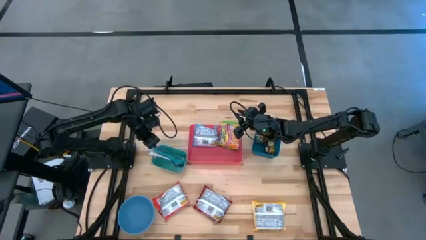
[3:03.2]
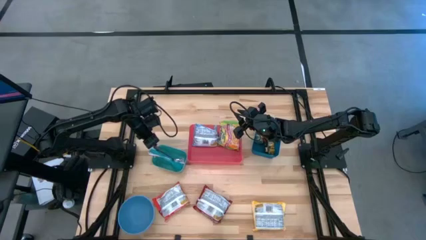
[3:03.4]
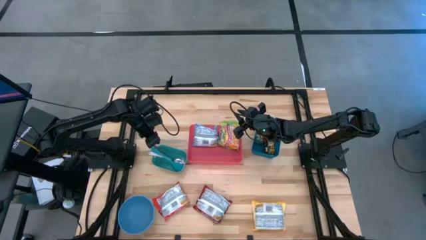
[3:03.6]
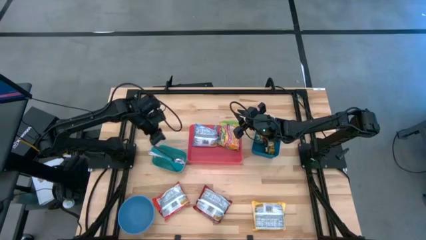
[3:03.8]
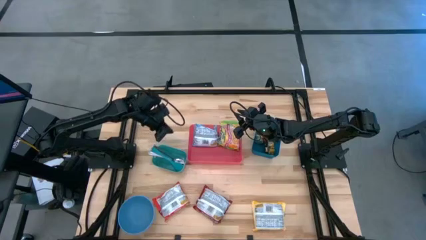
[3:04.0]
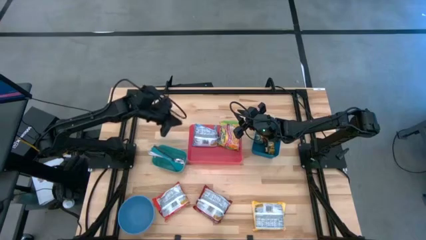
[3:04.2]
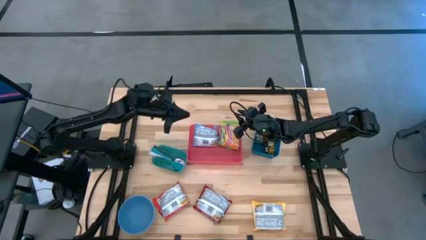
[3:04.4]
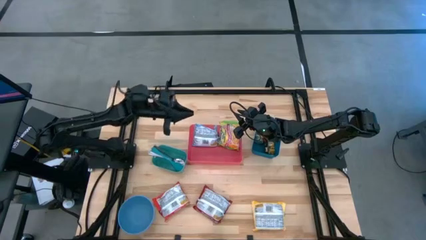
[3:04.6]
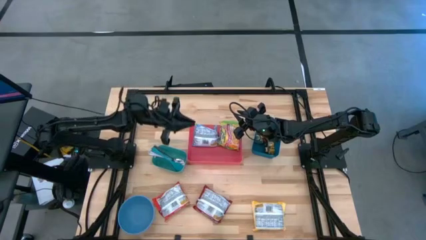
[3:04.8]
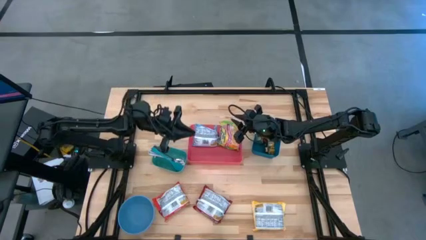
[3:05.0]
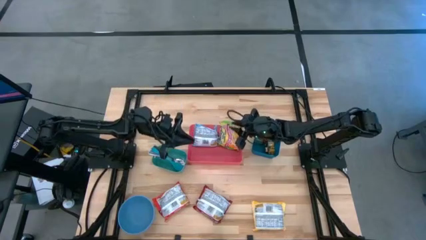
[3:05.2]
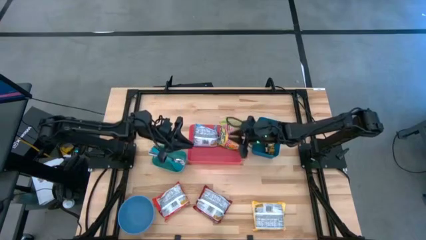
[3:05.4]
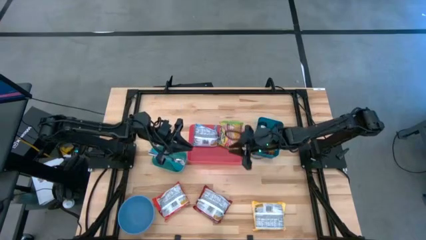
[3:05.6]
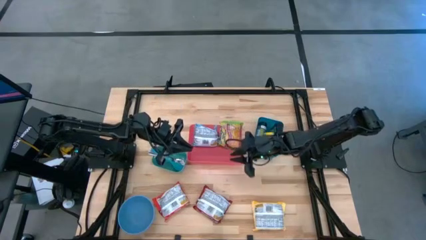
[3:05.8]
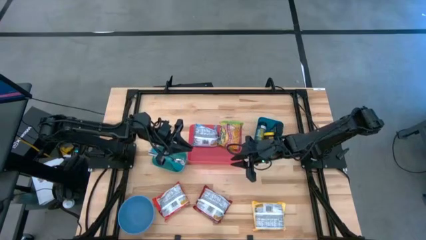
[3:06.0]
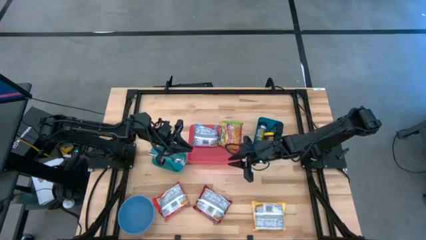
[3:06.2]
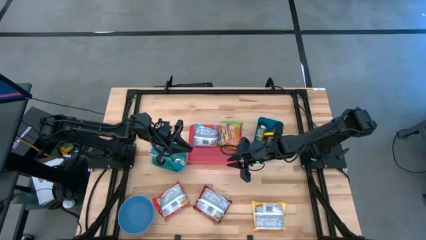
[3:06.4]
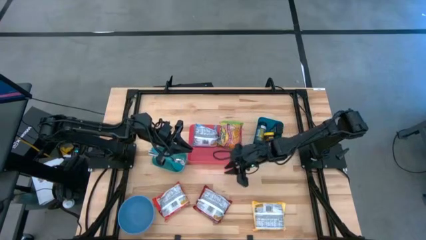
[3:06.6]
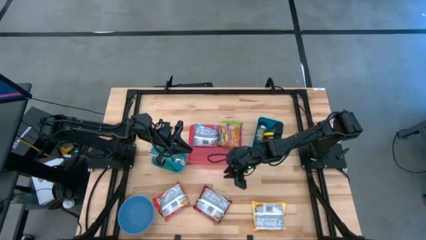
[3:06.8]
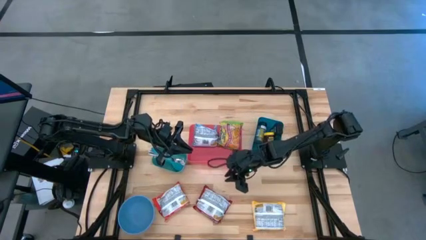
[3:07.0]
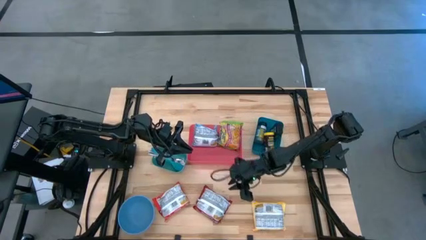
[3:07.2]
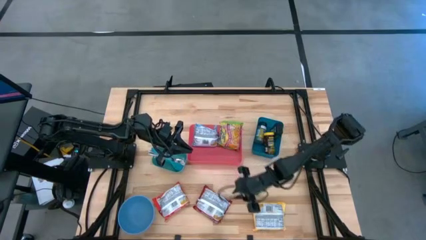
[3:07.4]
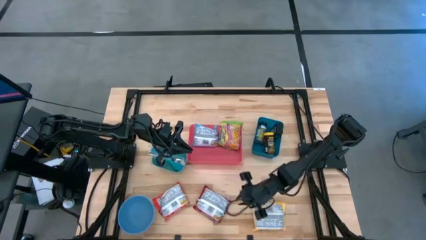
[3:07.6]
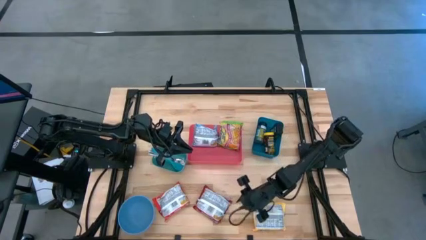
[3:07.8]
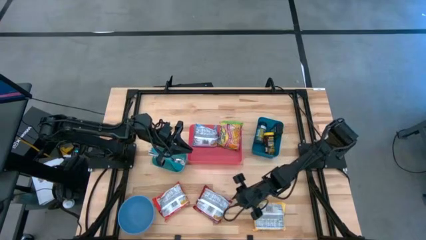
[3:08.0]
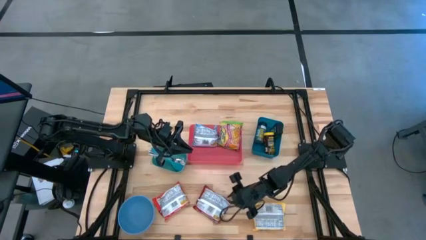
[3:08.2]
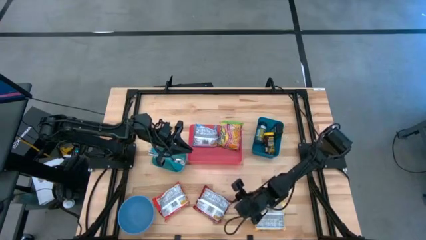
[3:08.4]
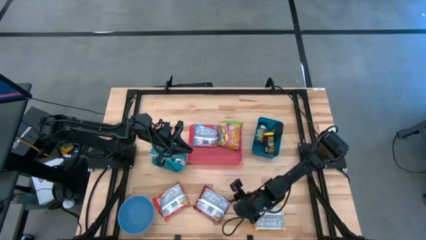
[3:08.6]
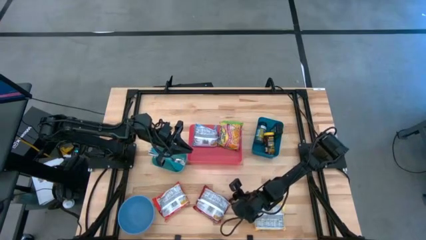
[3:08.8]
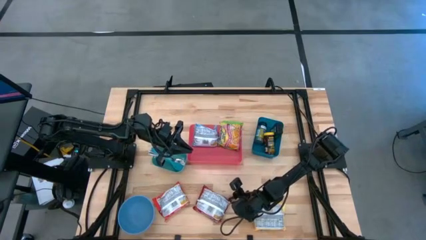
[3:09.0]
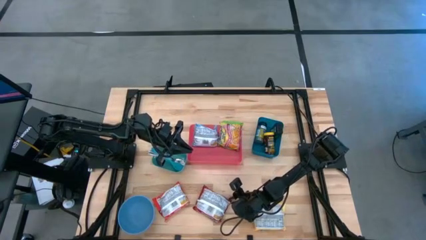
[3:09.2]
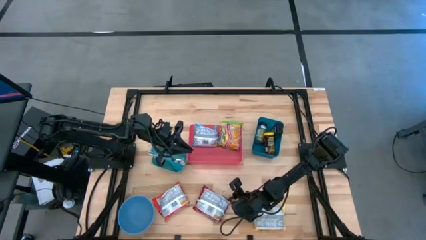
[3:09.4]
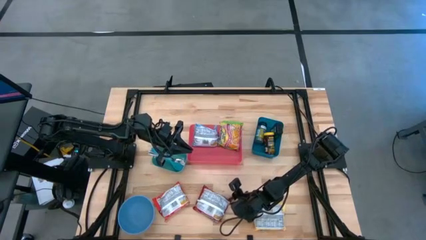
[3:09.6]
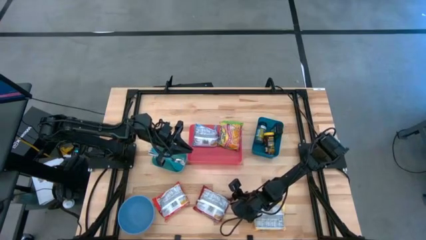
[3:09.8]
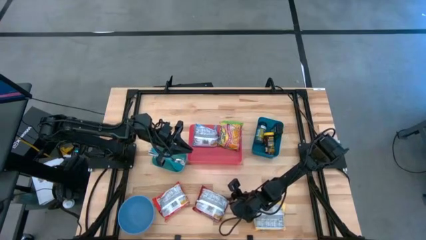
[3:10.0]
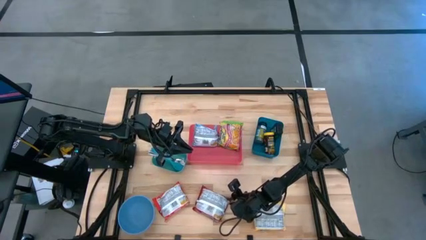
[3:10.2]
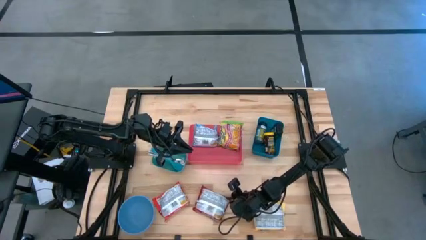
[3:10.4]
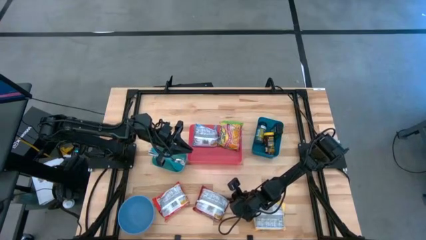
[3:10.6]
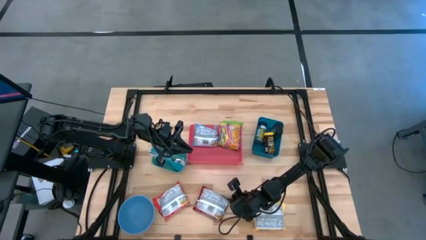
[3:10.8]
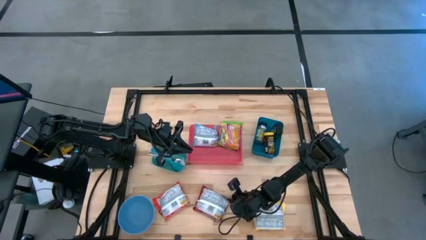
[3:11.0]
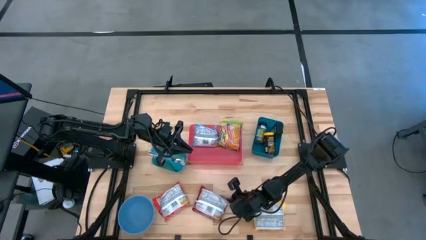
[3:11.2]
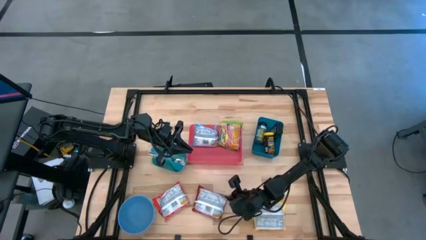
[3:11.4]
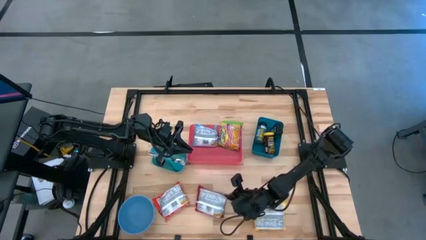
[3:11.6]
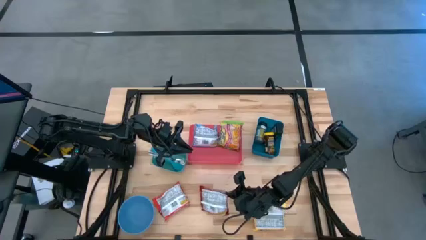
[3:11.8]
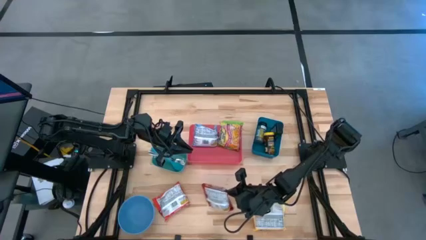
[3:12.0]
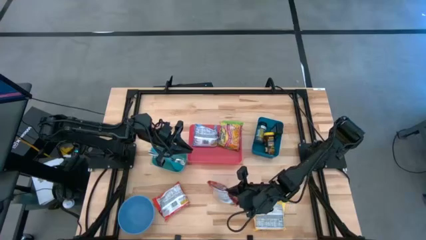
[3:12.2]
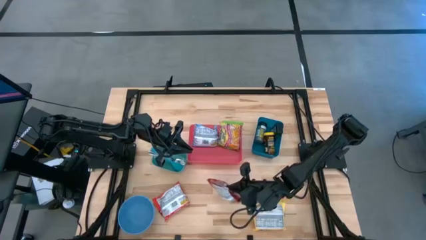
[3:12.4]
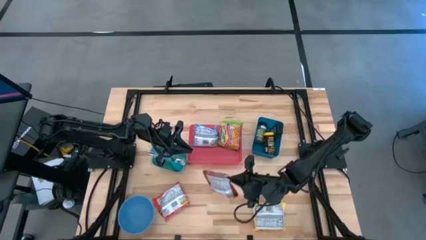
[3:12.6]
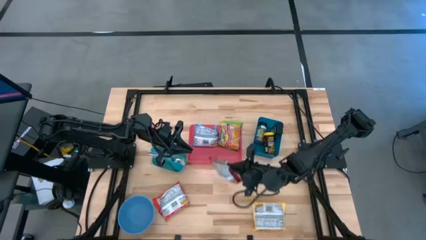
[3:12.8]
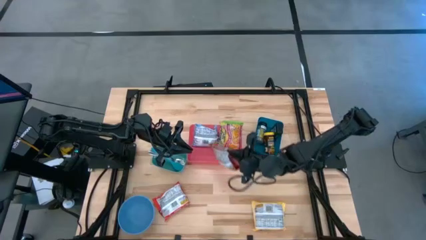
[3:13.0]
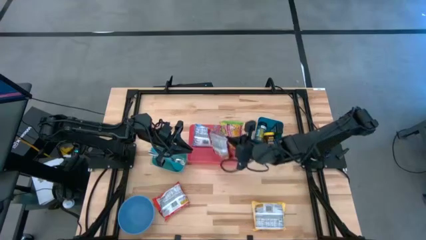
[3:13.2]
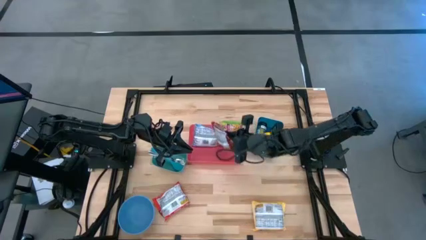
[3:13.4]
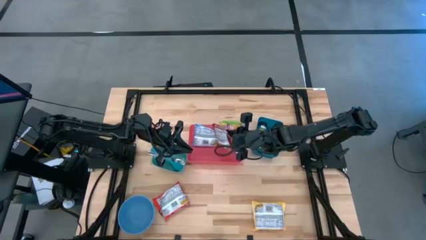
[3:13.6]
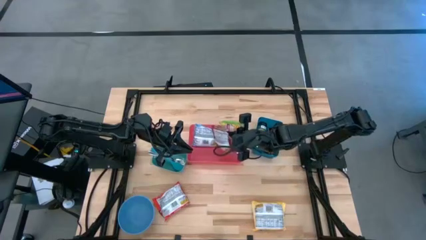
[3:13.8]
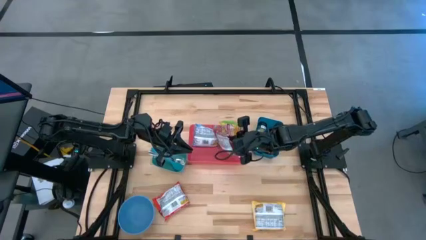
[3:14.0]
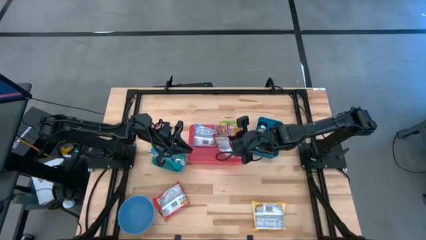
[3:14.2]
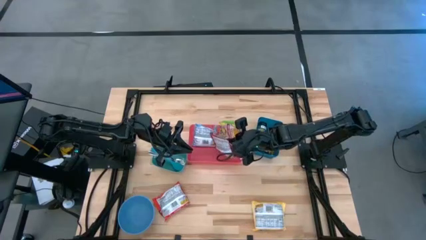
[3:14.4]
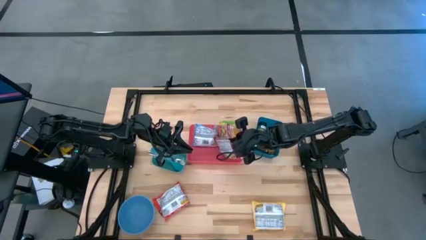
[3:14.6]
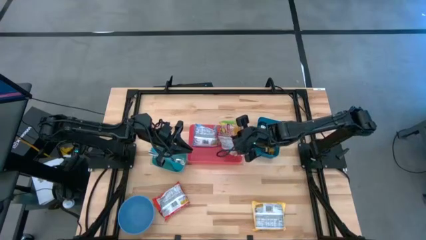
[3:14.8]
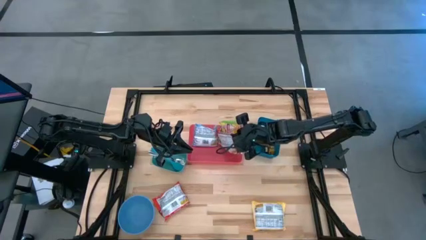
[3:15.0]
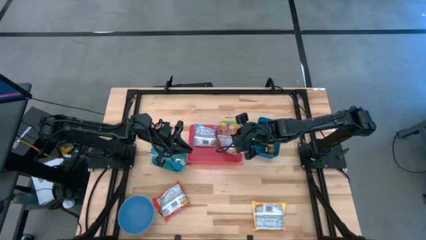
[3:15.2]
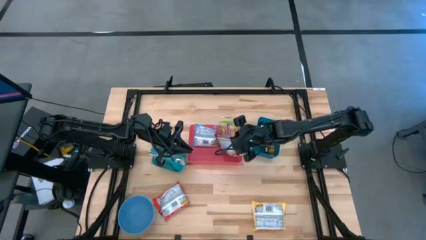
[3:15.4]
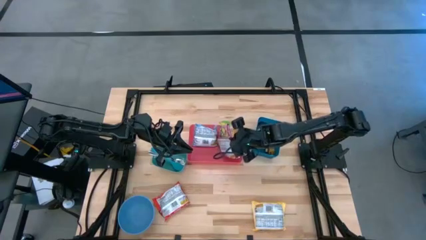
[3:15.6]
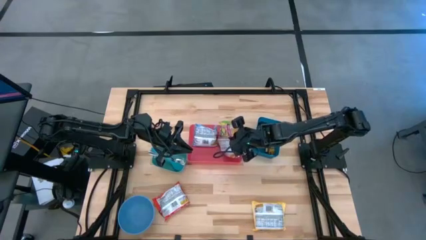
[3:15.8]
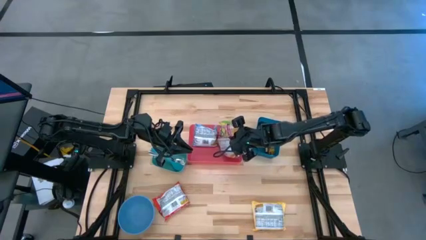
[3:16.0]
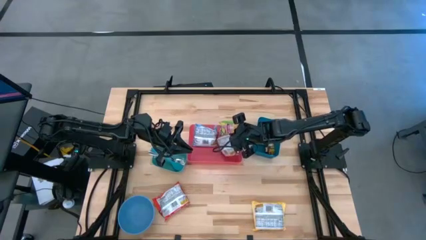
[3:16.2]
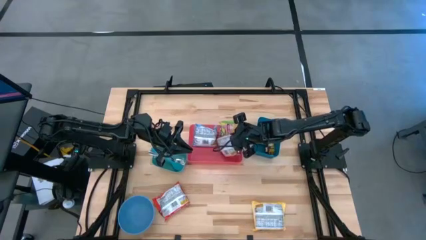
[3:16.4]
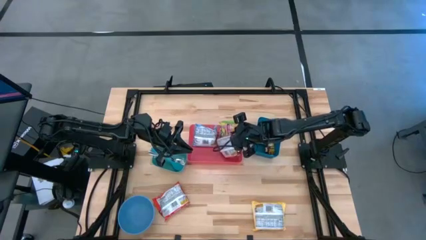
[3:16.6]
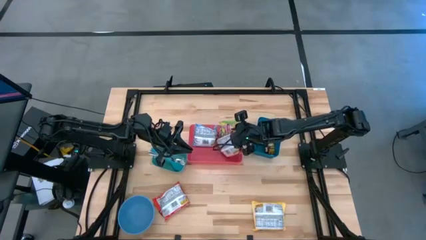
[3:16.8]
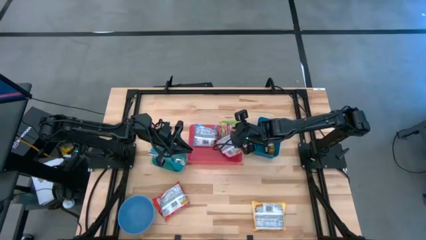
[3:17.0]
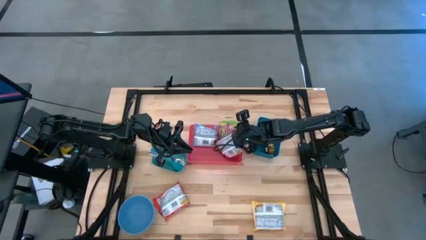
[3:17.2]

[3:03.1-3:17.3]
Task: Pick & Place Food Item
Put the red noodle pack into the red bin

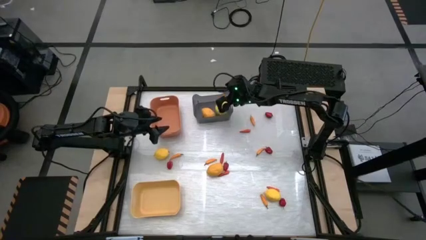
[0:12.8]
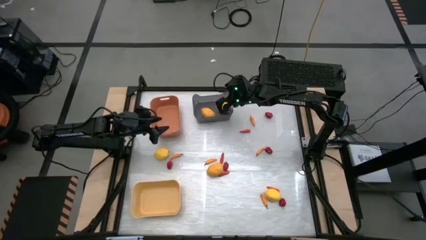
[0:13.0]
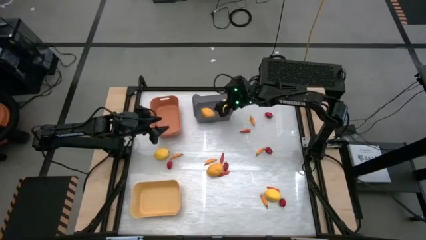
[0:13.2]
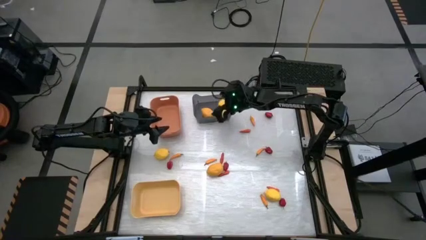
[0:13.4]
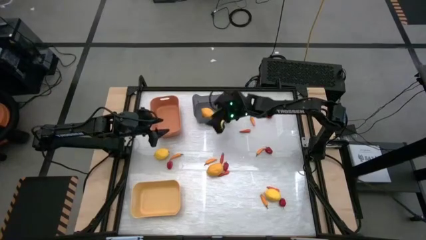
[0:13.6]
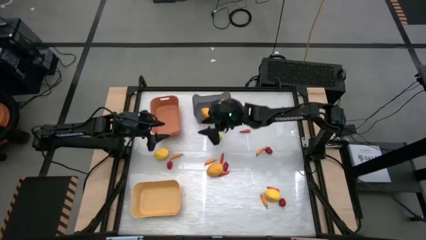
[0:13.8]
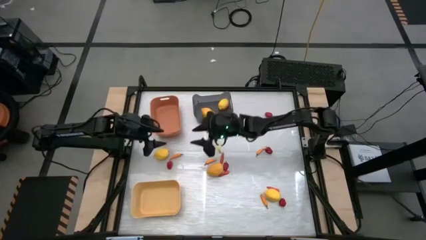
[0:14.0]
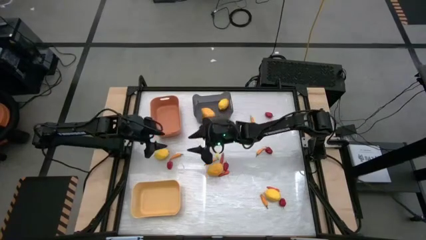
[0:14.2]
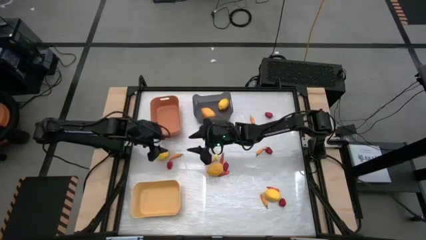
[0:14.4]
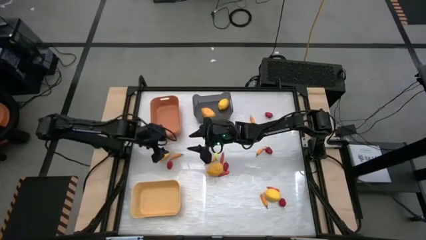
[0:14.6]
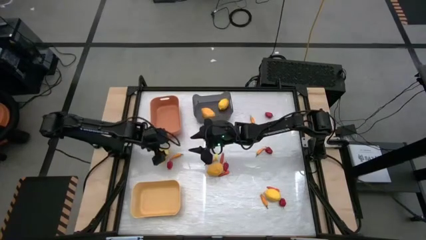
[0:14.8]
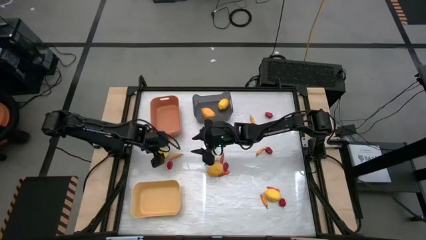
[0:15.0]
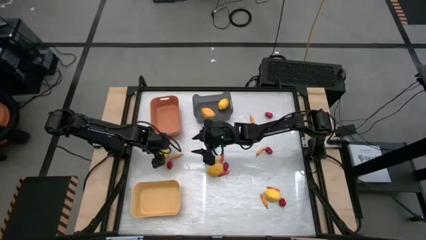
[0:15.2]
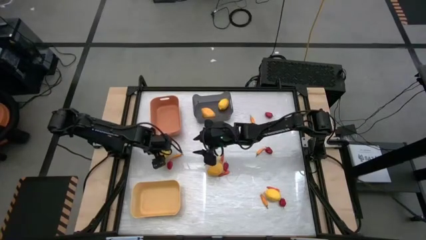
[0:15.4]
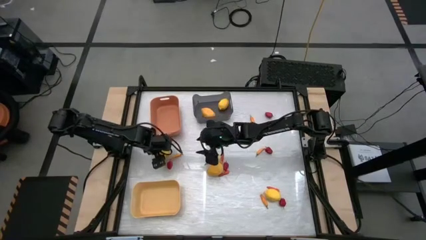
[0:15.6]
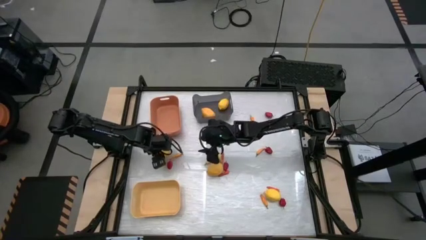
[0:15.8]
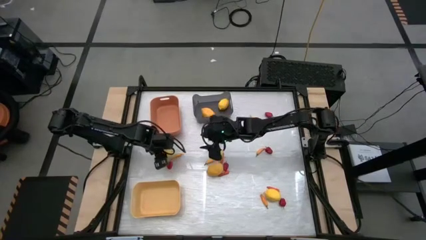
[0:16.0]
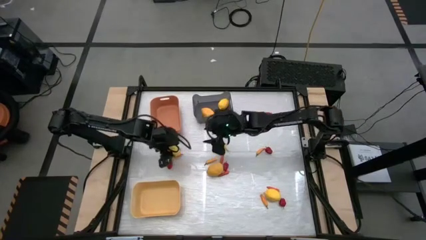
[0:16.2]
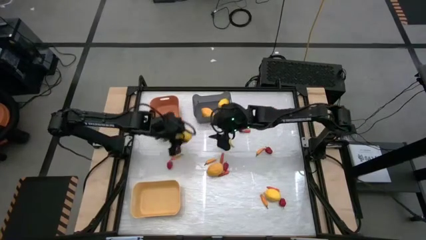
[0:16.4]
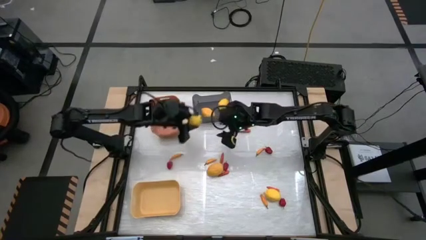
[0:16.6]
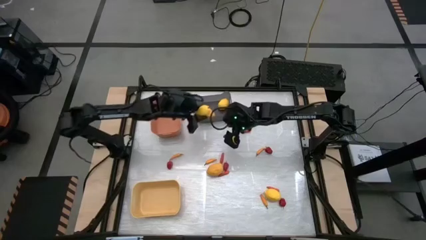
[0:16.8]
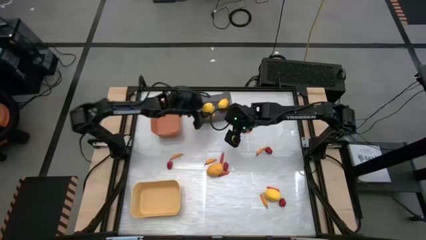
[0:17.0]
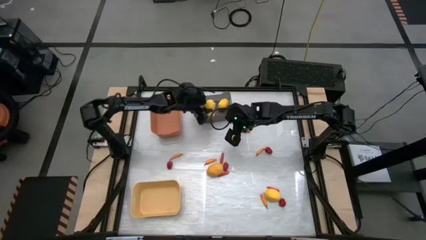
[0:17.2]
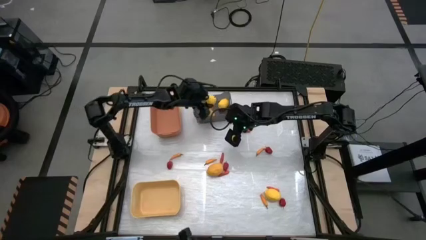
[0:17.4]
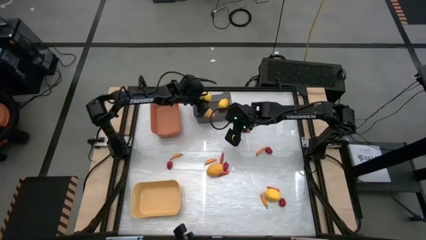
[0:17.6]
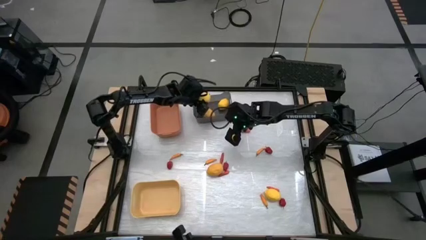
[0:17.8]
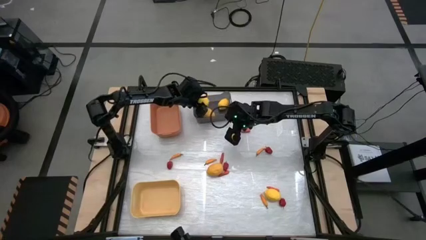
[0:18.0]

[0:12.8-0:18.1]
Task: Sort produce into baskets
Put the yellow lemon into the black bin
